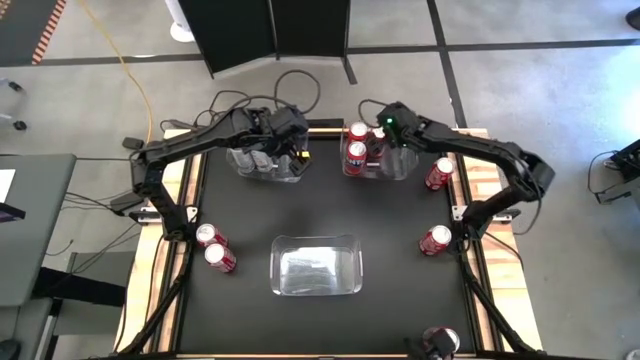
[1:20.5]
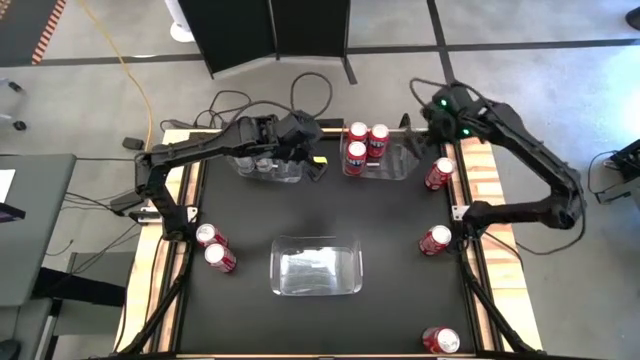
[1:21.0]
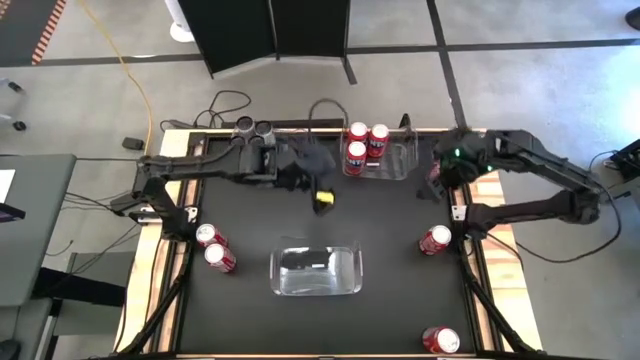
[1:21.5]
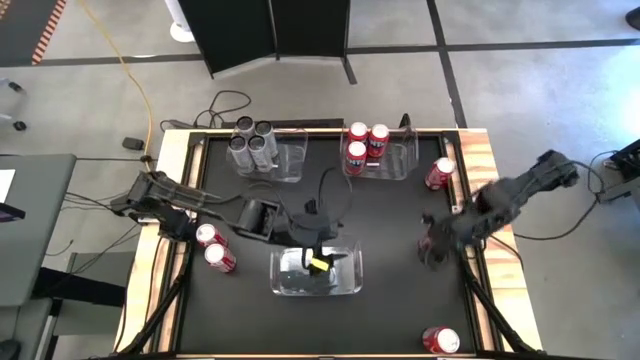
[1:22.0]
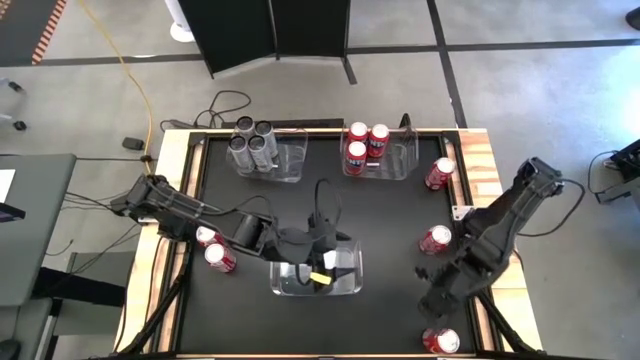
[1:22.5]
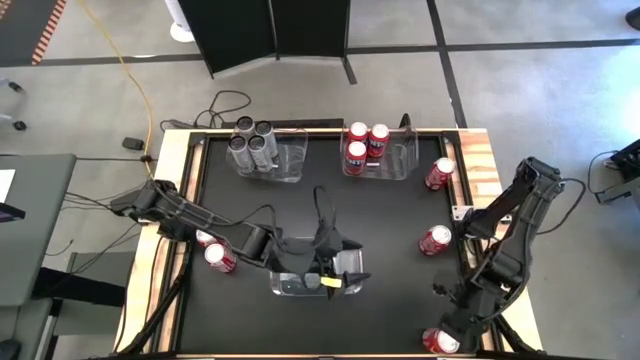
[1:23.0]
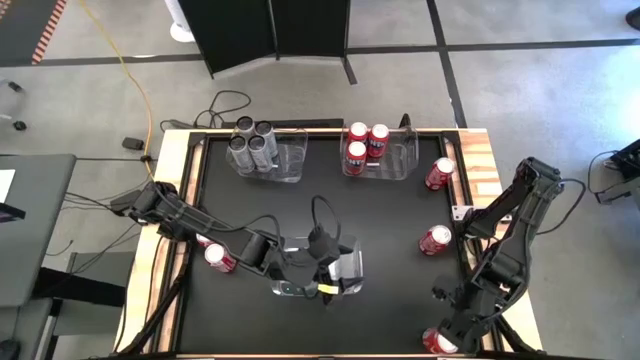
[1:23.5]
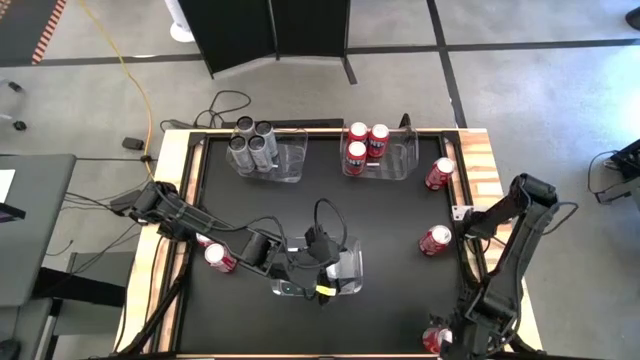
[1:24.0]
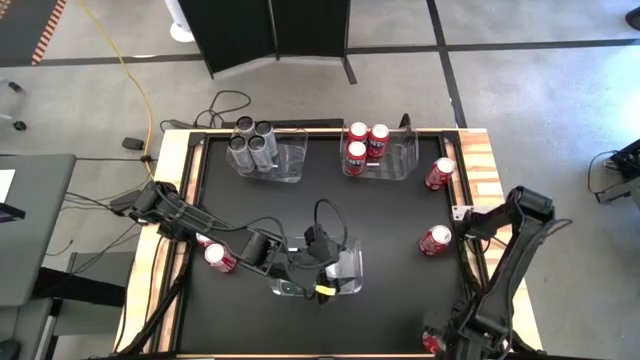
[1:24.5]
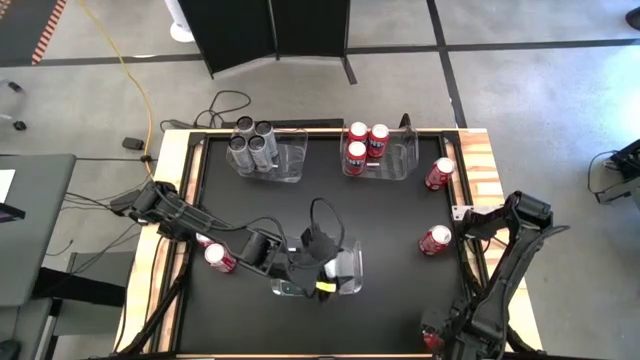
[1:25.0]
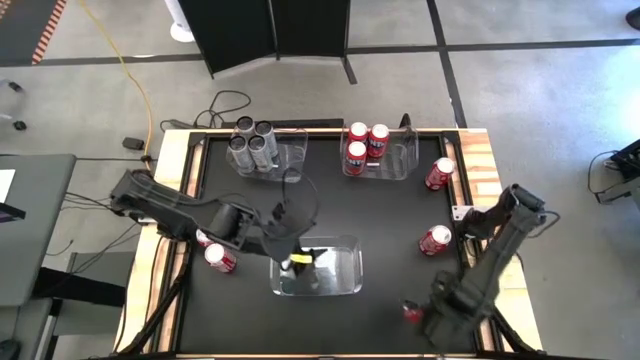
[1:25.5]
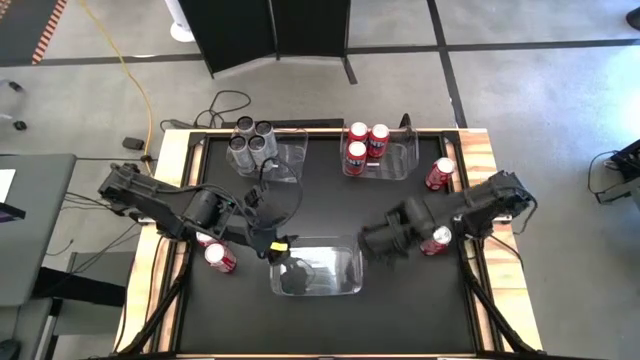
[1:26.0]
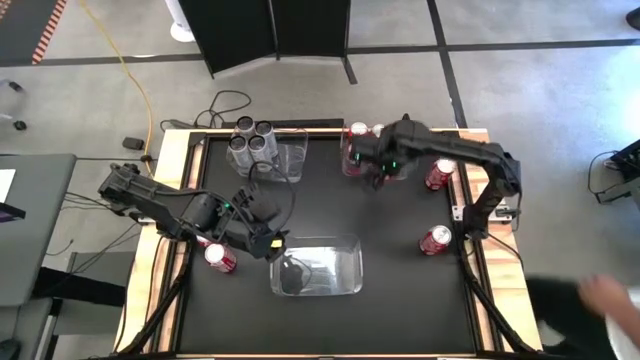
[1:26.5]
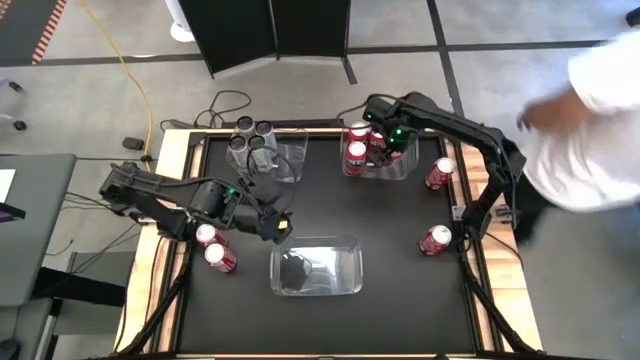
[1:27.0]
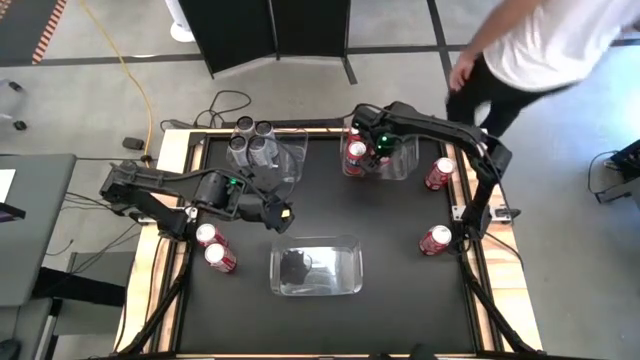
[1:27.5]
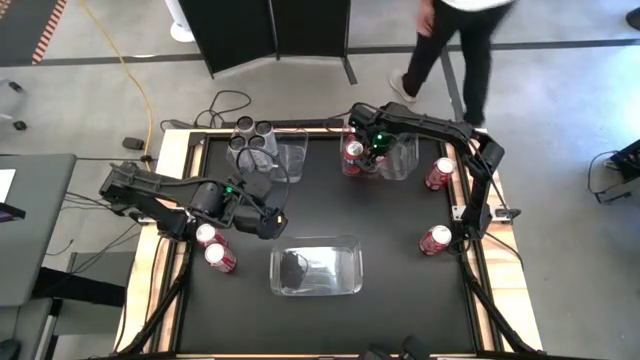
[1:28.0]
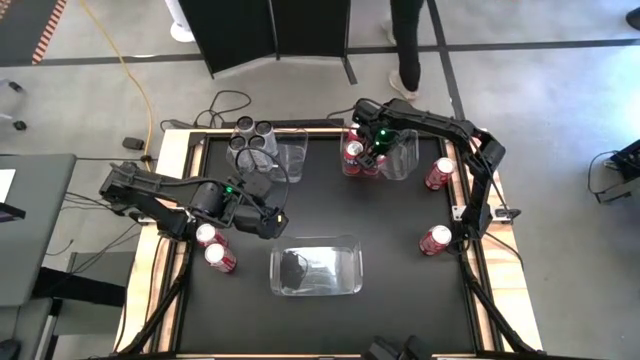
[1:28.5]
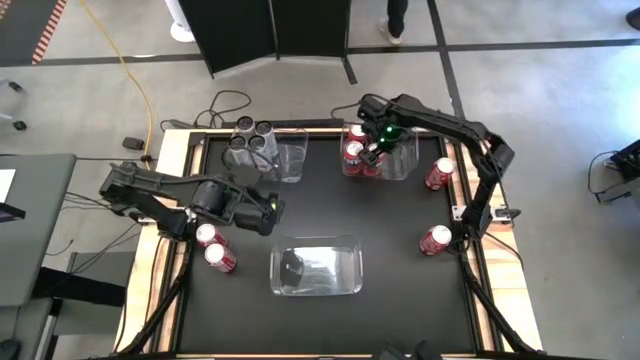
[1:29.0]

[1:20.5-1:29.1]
Task: Sort soda cans
Put the red soda can into the top right transparent bin

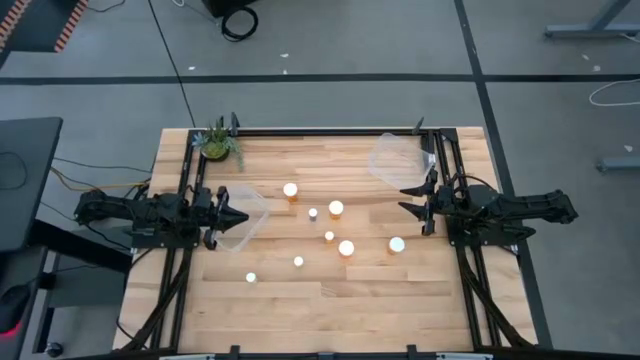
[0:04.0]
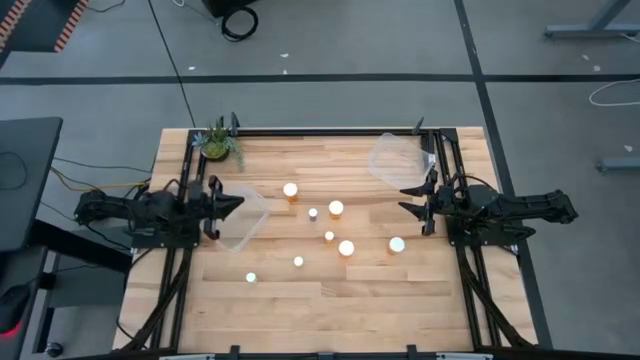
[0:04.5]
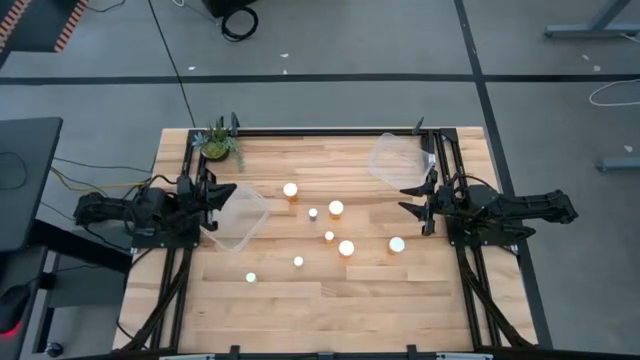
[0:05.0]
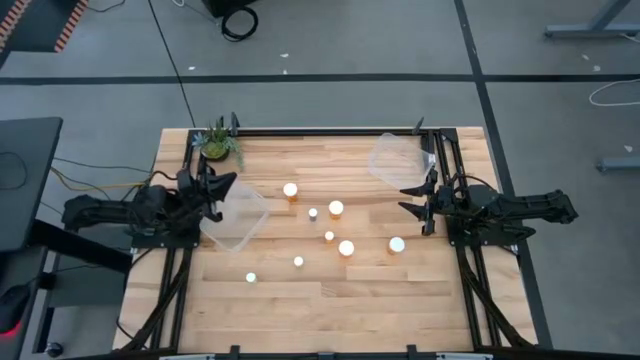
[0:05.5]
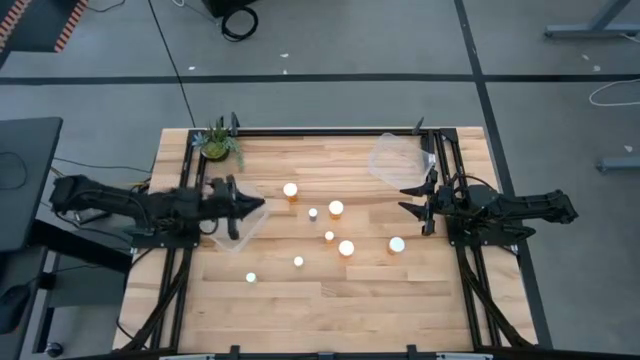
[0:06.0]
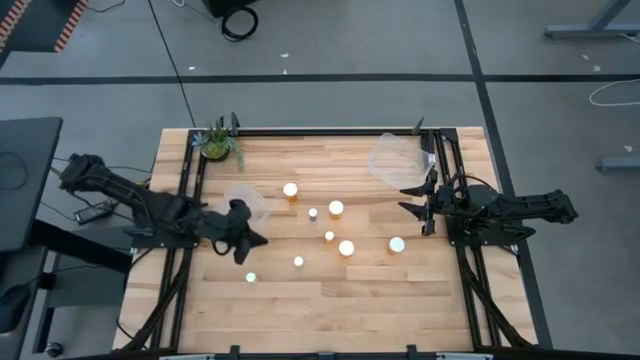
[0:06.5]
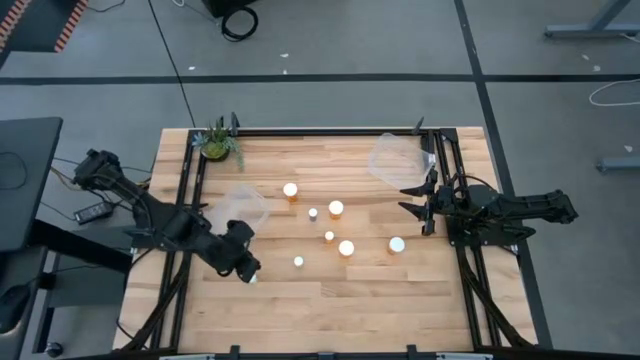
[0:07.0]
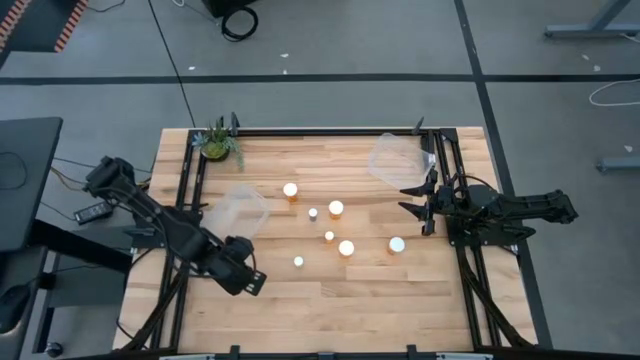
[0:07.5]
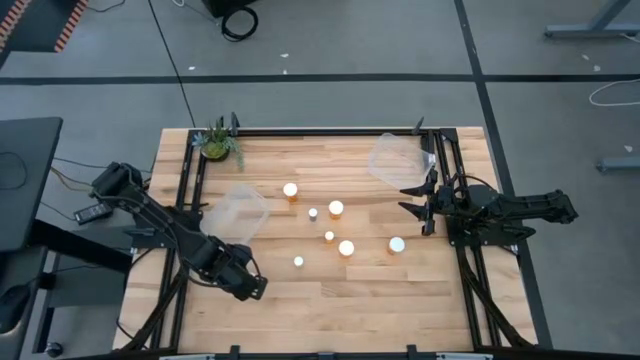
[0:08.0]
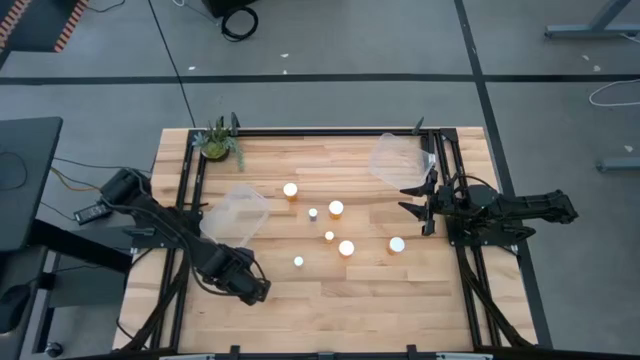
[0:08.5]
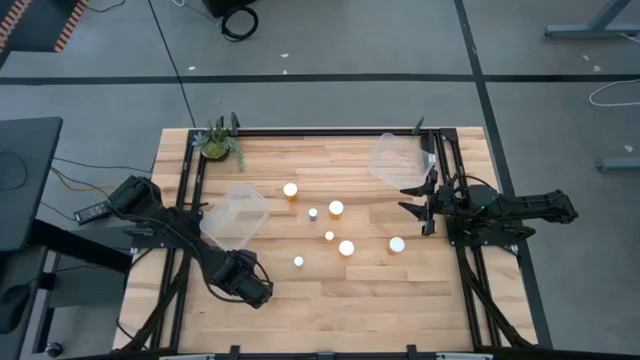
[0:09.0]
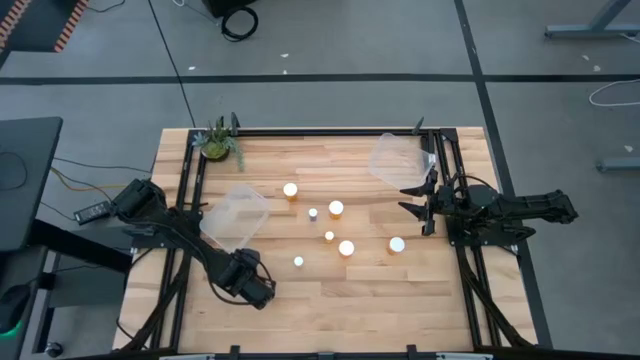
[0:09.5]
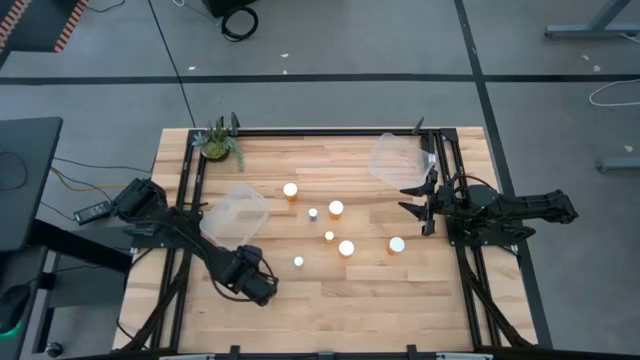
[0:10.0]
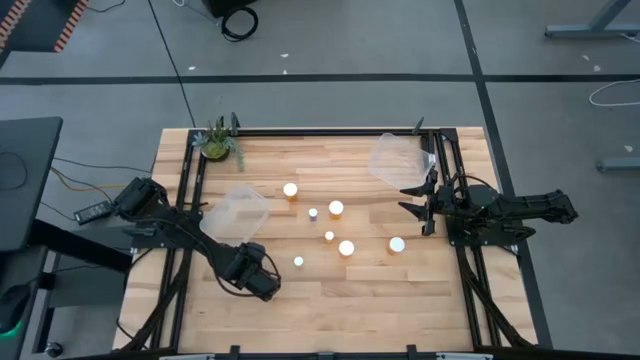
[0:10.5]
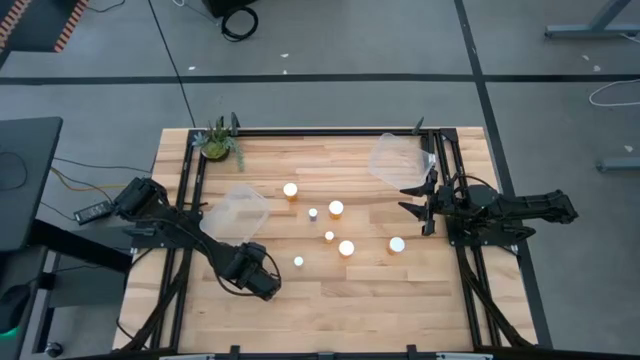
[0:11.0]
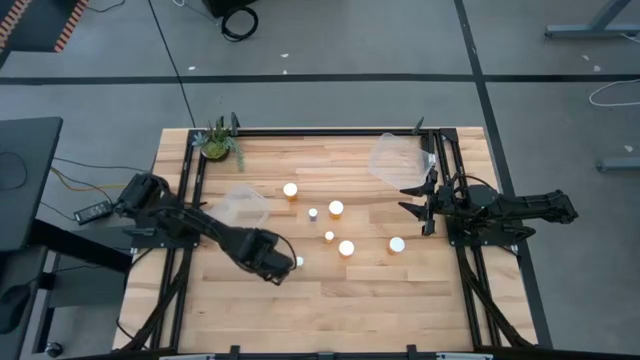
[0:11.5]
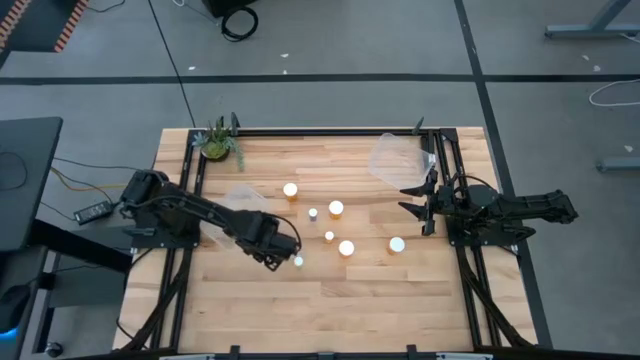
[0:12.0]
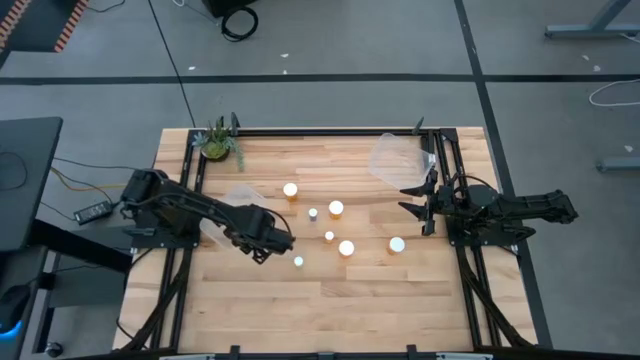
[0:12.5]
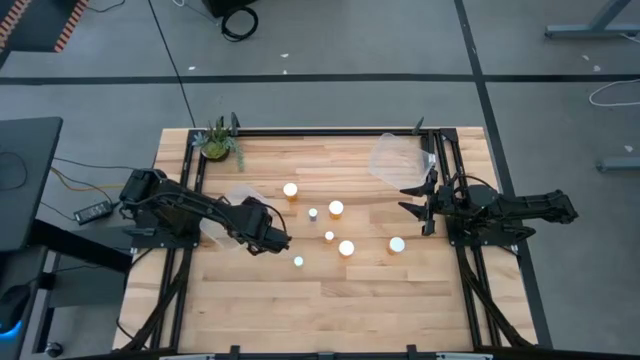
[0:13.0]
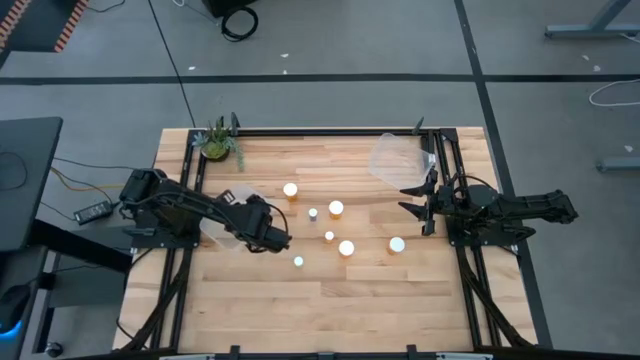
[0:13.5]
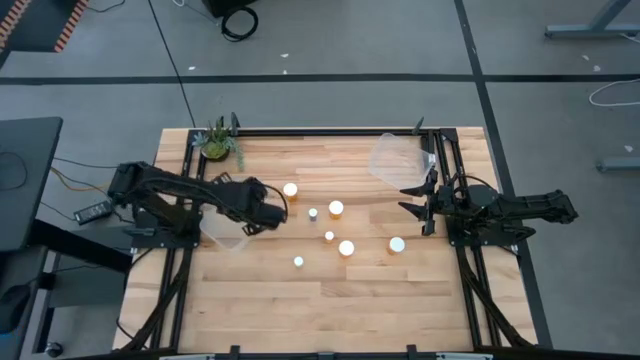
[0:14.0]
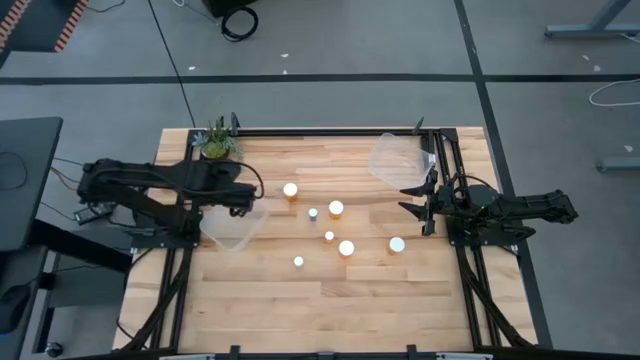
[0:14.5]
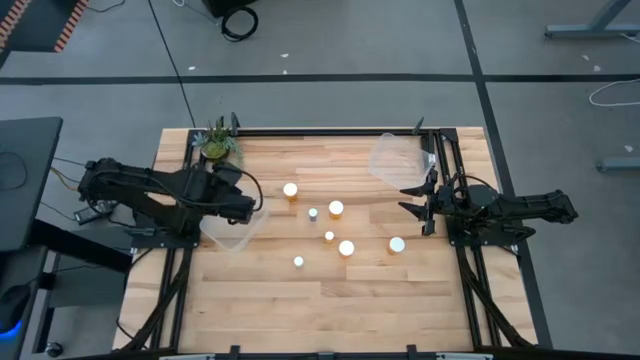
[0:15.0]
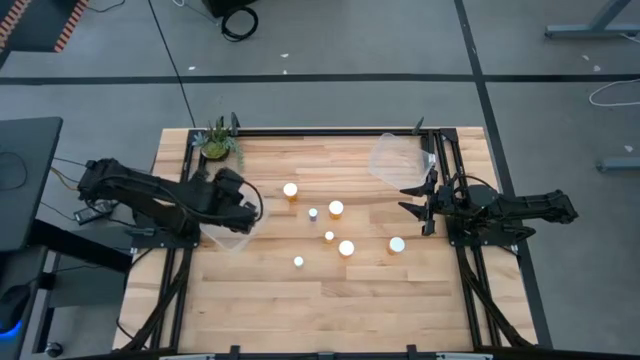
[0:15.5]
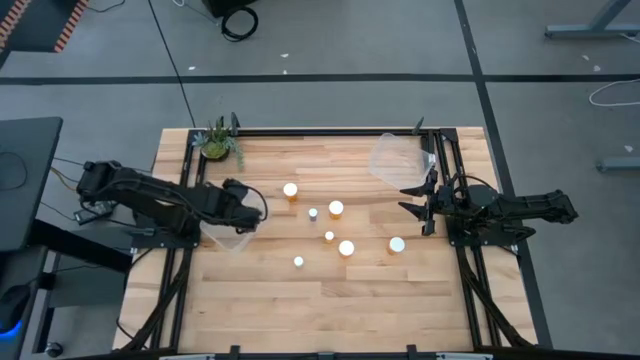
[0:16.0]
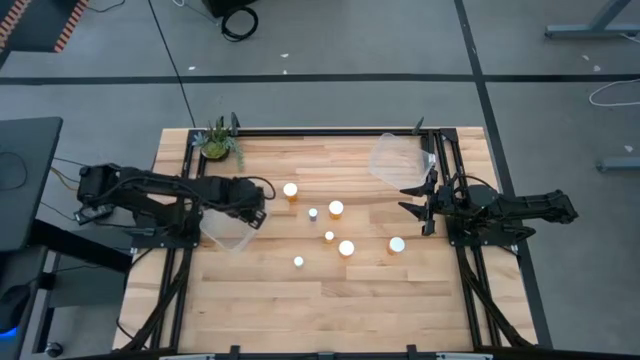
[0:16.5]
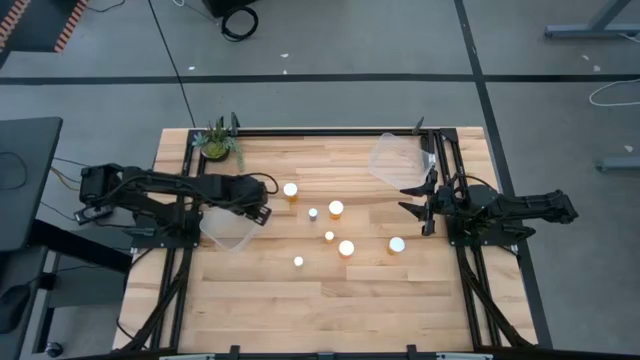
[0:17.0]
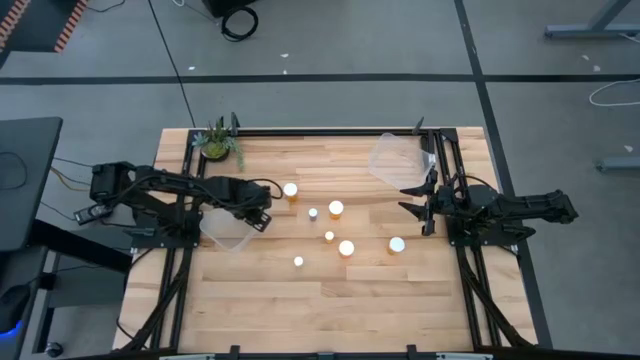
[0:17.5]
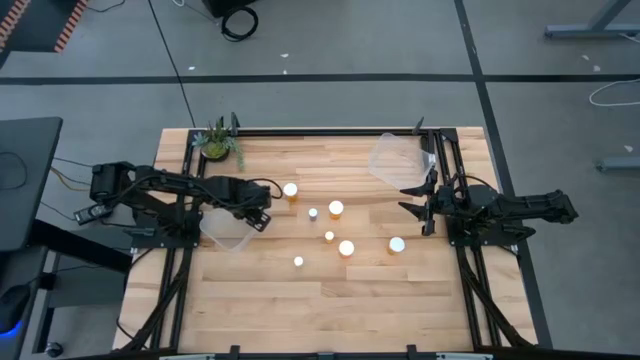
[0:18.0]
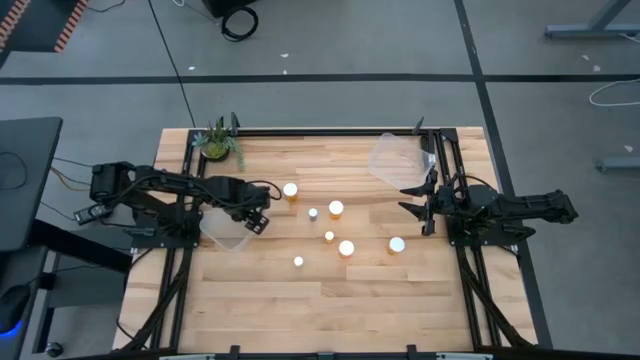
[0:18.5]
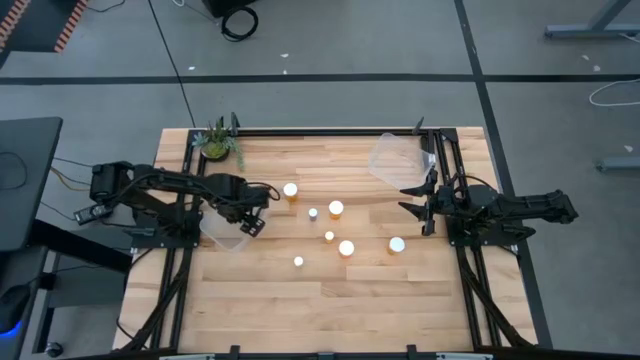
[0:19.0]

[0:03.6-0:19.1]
Task: Pick and place medicine bottles into bin by pill shape (circle, oval)
Put the yellow pill bottle into the left transparent bin
